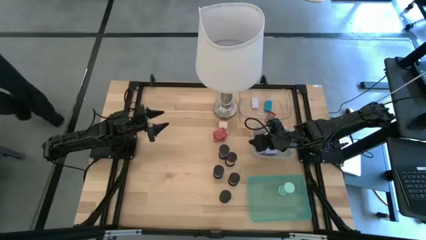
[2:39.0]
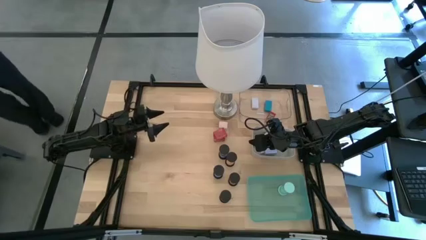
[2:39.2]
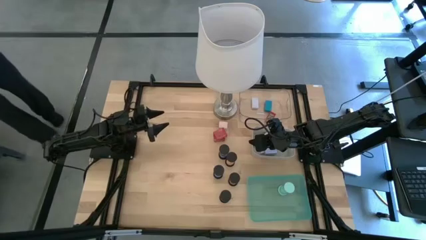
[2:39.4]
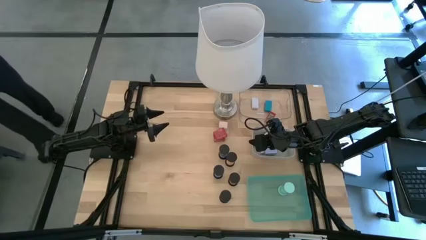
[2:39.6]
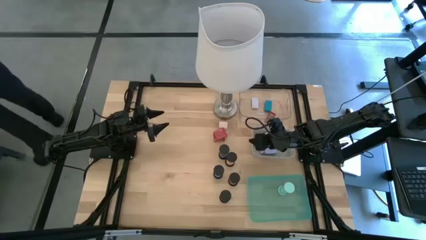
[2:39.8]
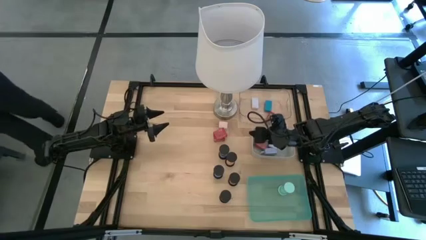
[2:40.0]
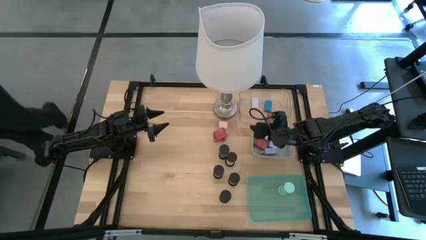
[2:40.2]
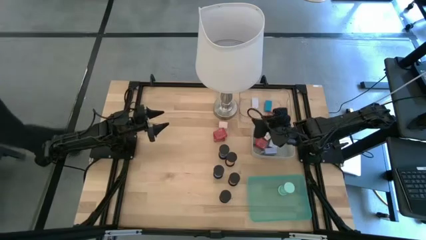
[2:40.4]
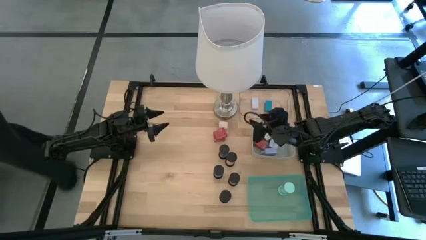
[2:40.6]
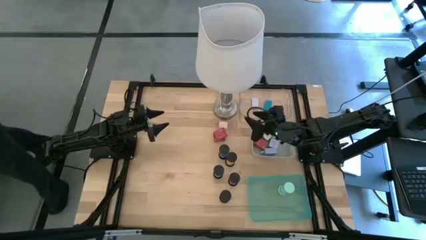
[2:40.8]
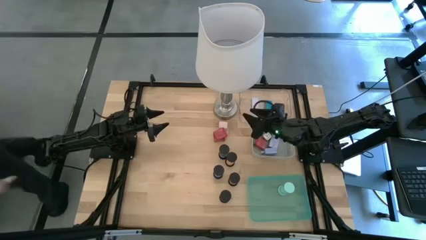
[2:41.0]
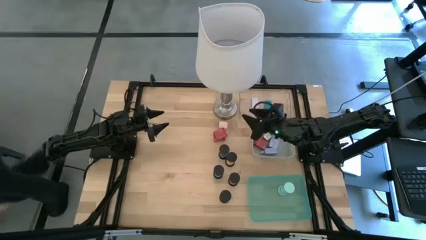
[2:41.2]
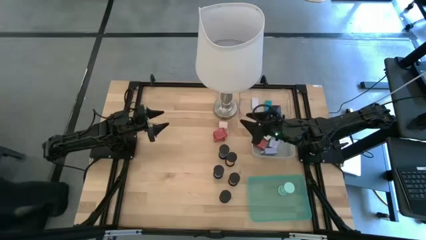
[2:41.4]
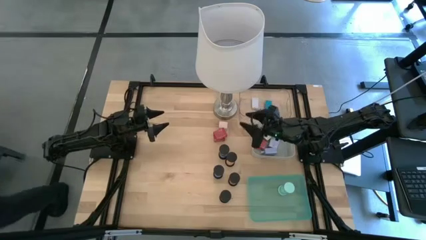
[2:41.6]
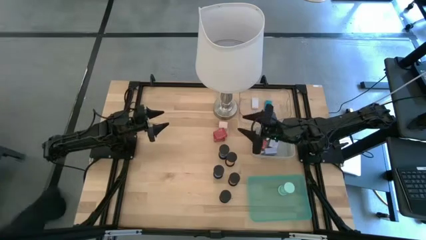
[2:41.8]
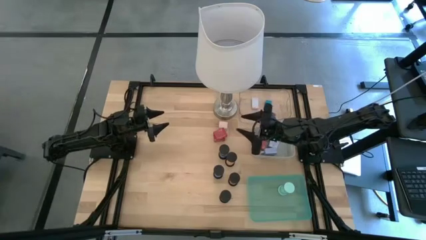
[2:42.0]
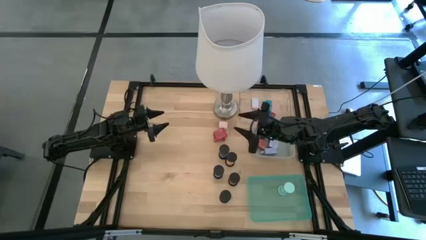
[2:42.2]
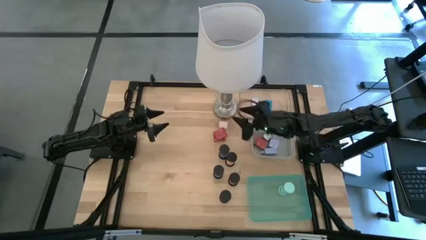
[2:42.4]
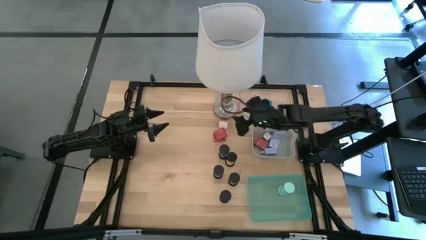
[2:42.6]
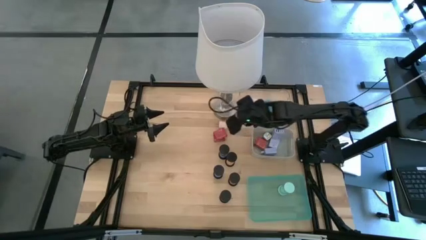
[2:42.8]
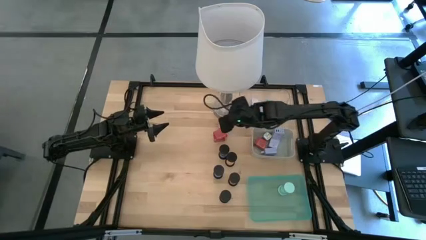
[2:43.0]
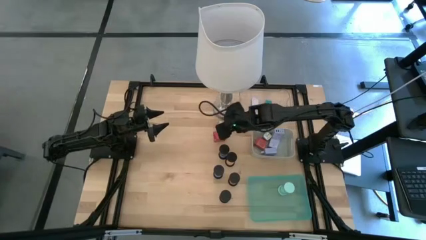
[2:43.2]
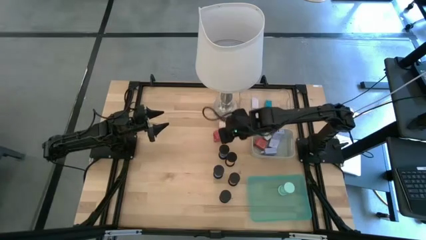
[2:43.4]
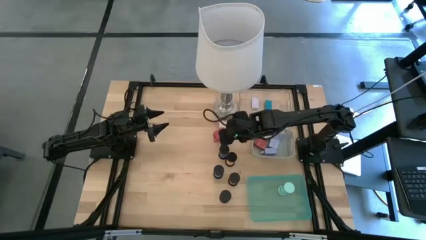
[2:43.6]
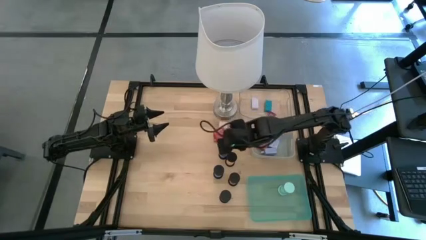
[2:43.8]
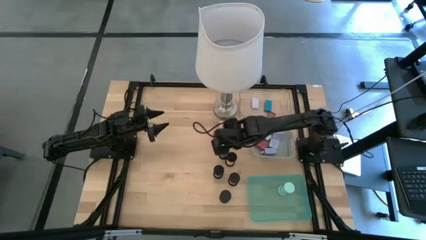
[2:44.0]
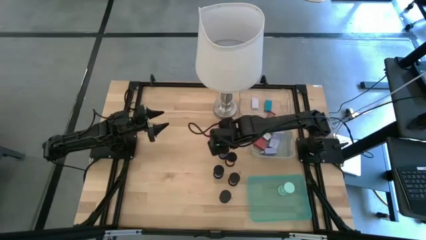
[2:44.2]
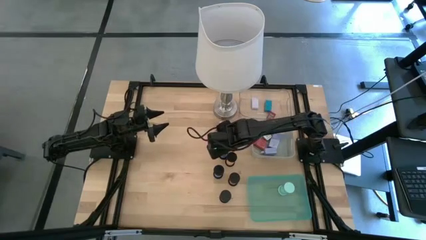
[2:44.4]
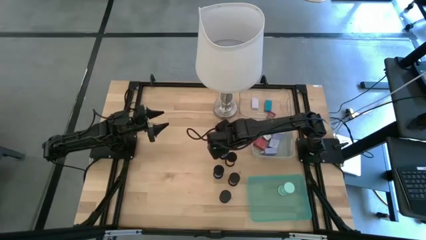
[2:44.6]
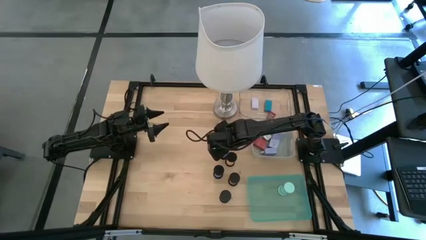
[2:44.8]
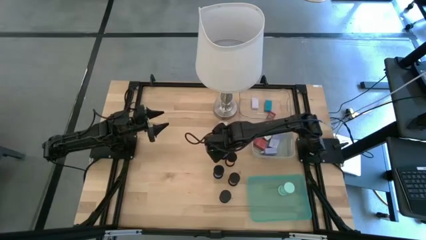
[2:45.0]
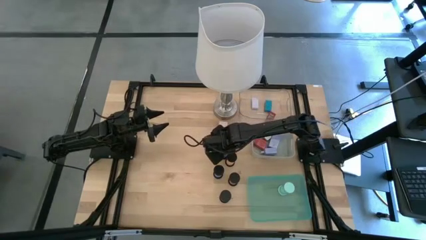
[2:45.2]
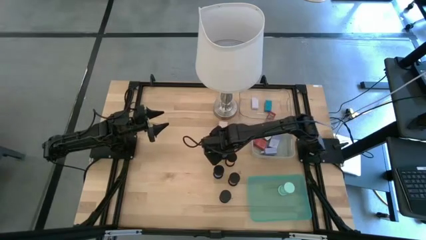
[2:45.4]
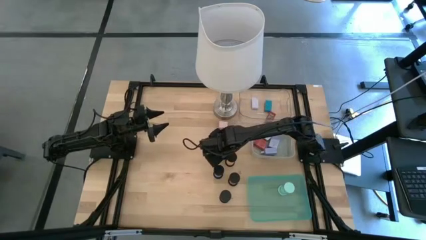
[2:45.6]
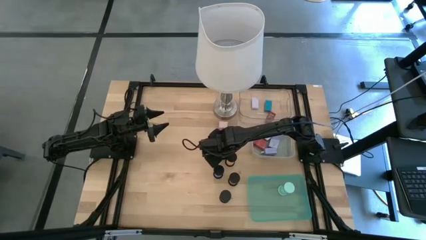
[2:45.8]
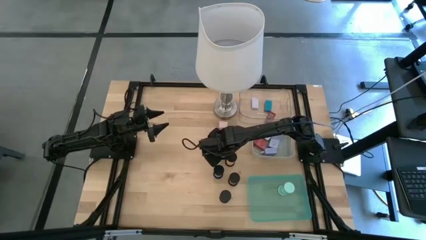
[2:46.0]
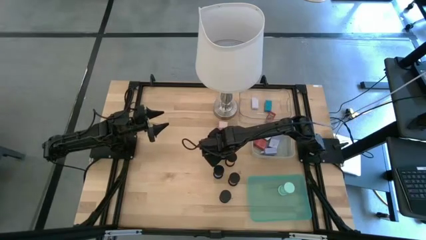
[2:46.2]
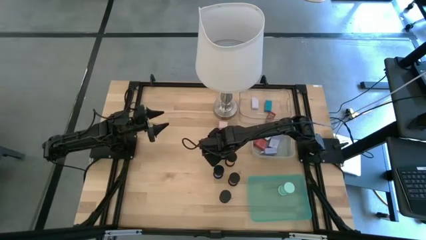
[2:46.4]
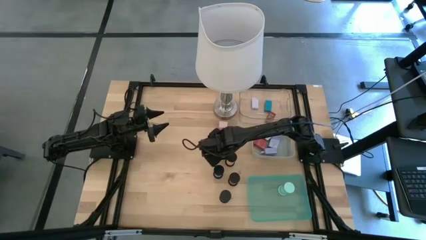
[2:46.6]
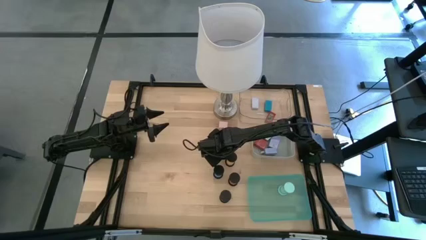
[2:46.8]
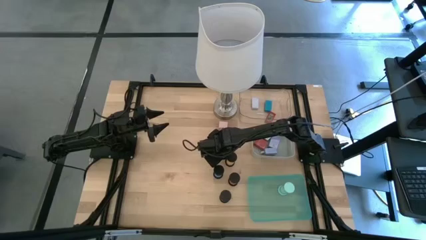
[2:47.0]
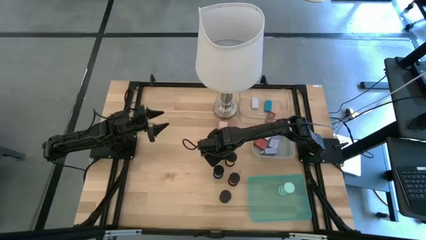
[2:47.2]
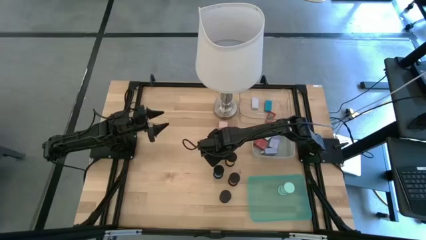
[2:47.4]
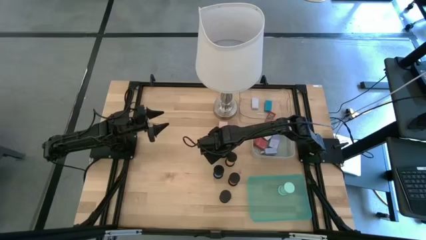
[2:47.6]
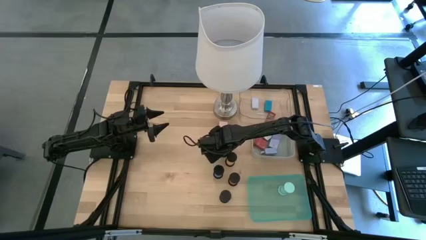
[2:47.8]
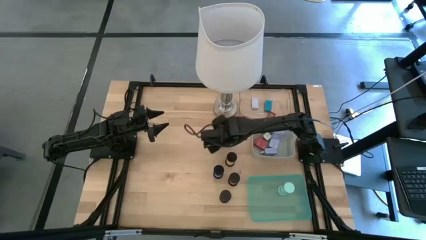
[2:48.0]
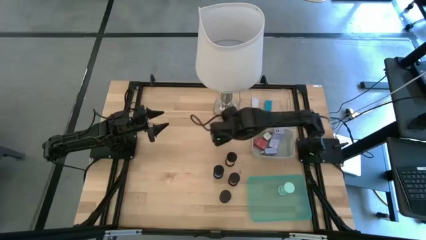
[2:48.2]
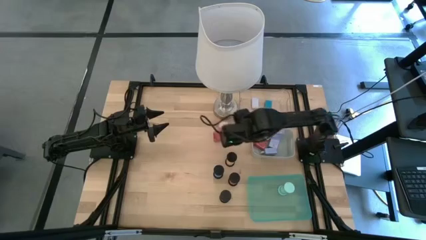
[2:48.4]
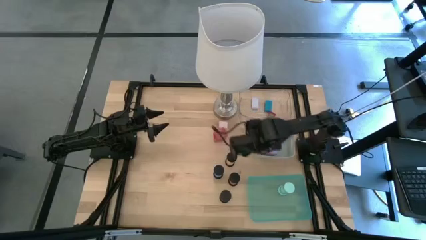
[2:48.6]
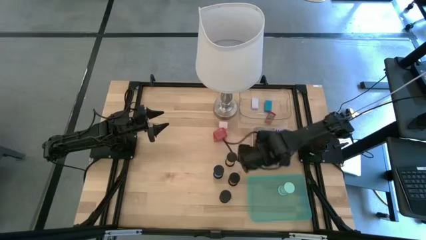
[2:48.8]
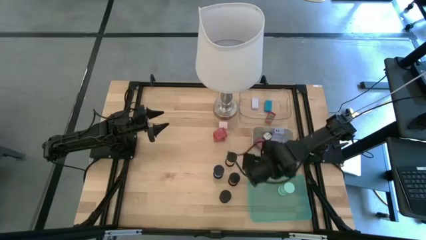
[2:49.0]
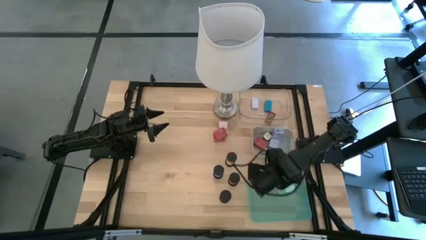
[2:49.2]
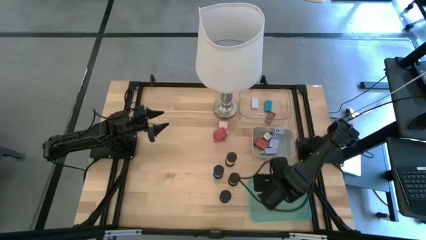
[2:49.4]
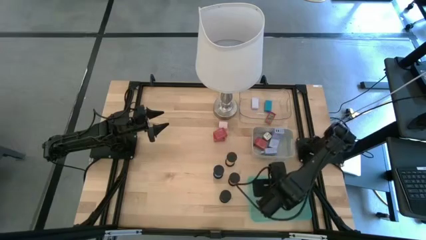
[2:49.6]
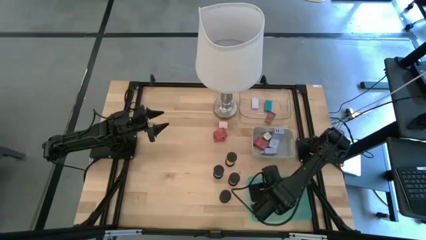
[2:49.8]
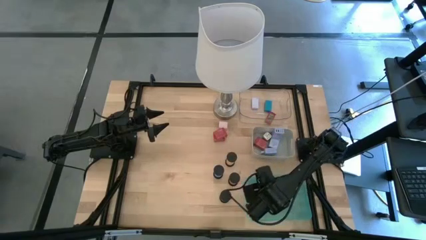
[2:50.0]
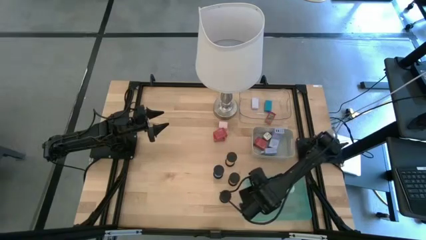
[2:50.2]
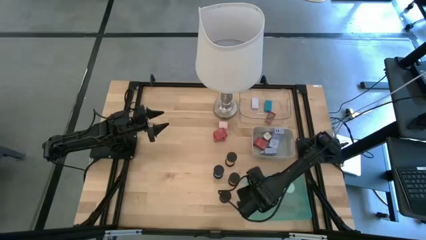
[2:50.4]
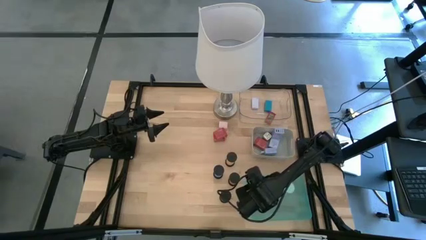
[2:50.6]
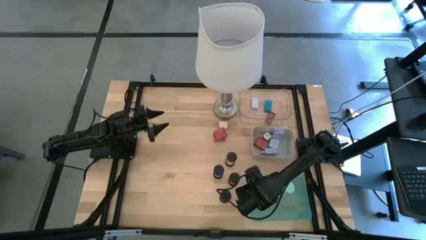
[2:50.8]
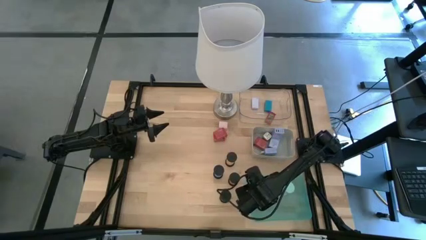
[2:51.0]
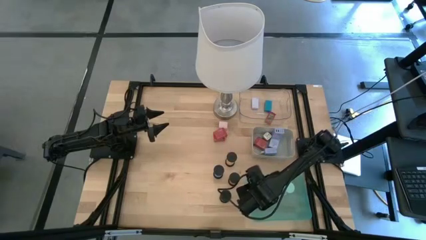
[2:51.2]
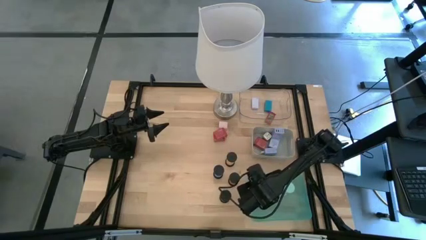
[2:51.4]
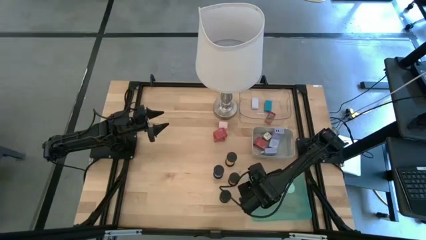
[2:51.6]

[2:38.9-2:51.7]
Task: Pick & Place Office items
Put the purple hourglass into the light blue bin

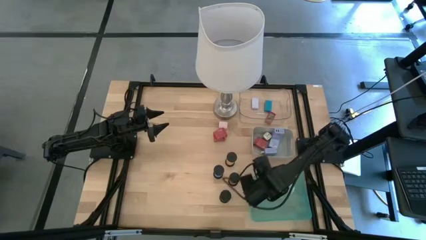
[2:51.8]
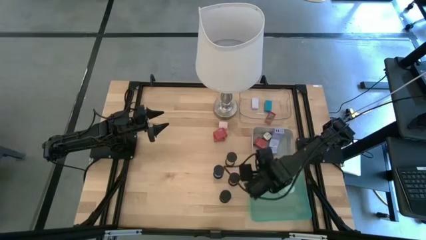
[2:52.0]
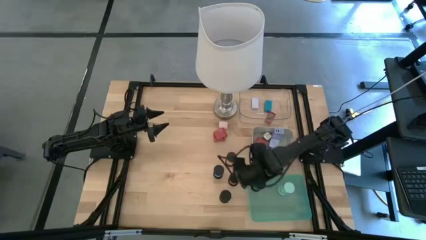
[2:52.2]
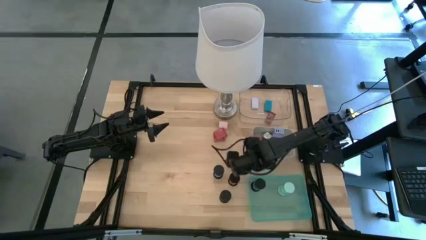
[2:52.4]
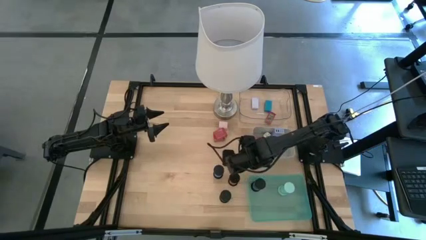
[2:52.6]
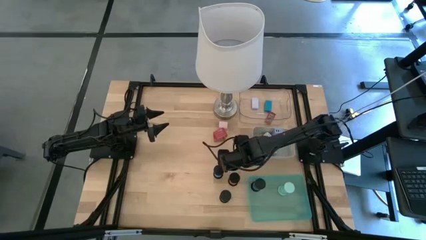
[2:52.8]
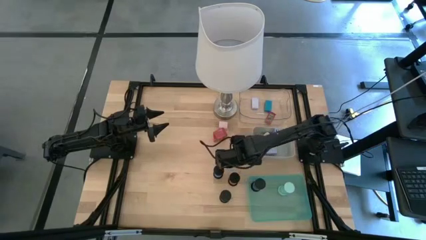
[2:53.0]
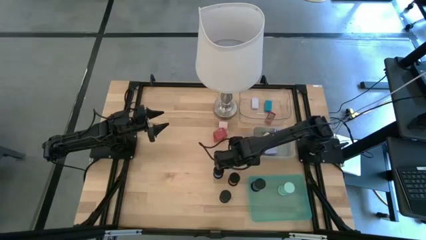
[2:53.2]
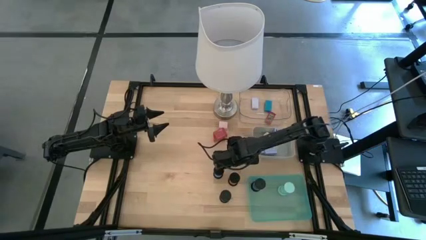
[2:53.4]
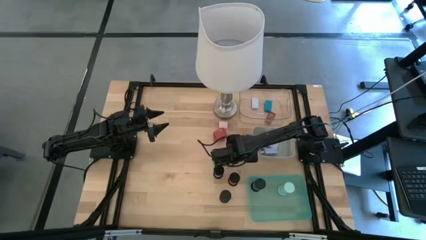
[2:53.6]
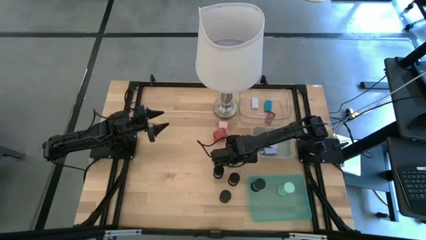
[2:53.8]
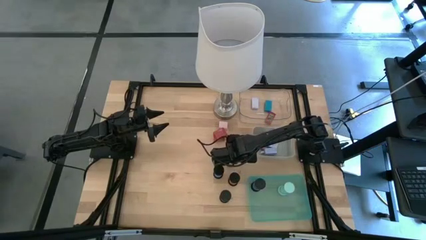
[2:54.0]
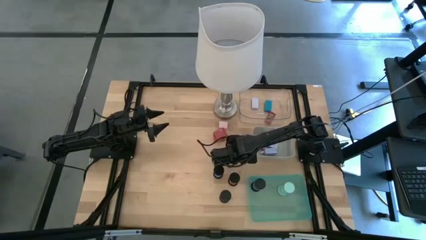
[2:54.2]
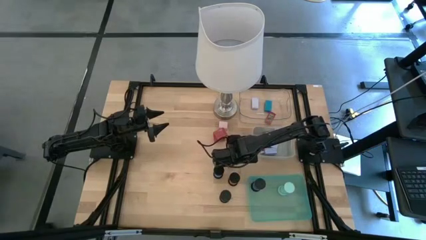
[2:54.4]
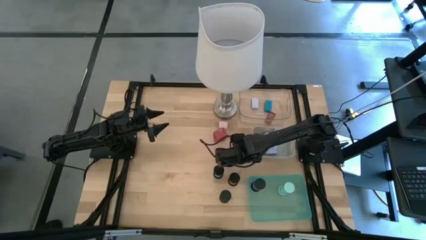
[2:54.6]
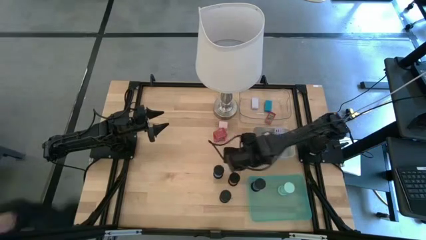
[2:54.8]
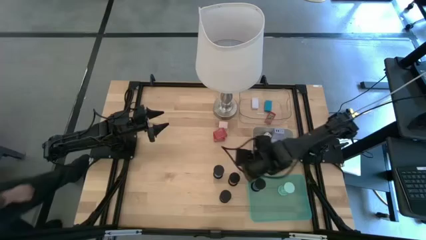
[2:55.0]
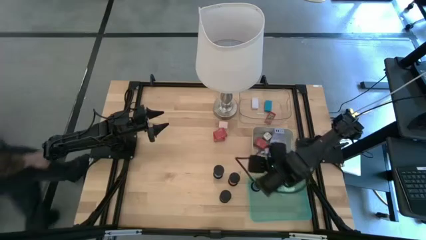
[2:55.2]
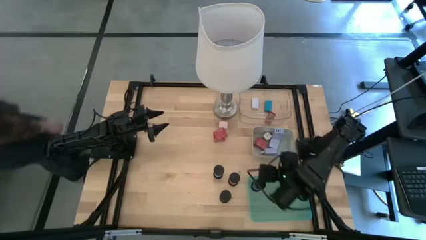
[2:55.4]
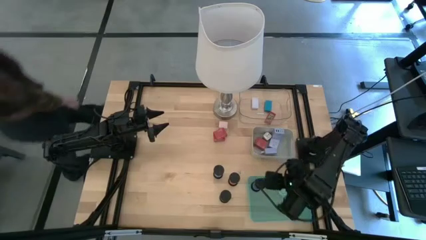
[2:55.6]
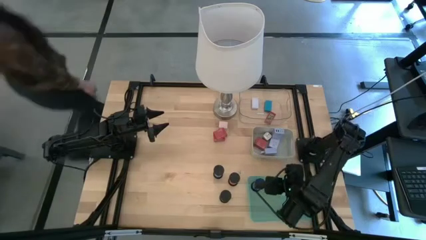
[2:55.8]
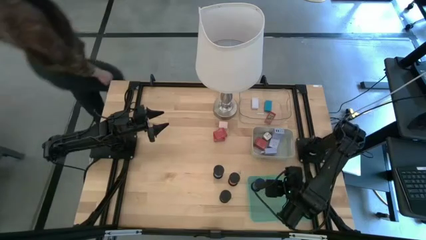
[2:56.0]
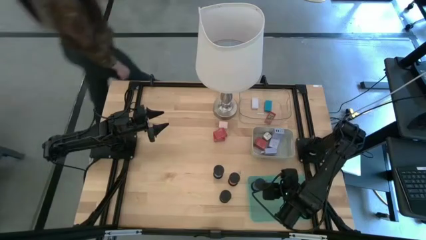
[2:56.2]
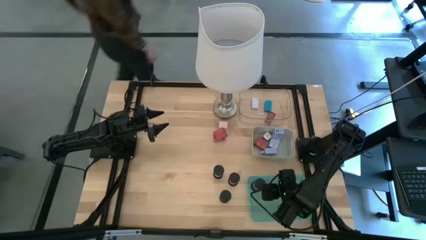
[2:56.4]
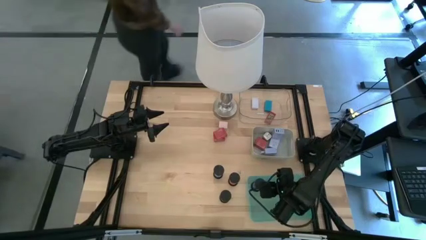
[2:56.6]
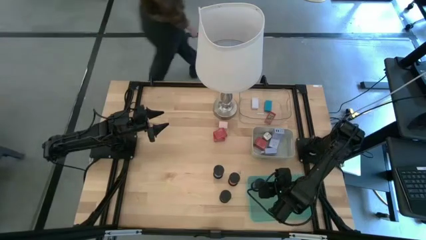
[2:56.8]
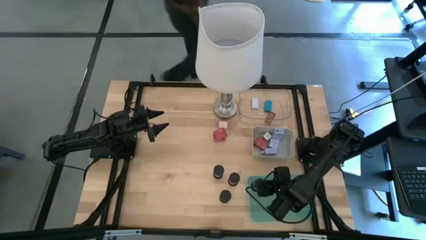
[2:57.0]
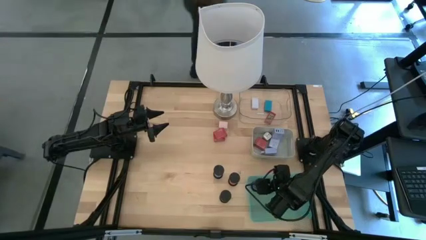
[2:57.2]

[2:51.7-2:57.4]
Put the orange hourglass into the light blue bin
